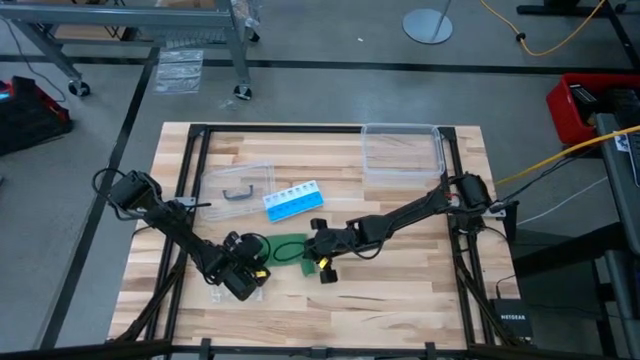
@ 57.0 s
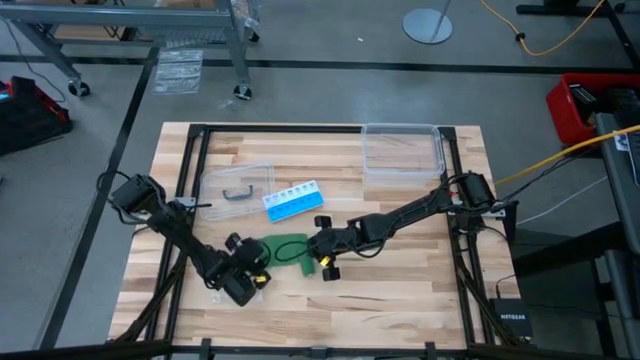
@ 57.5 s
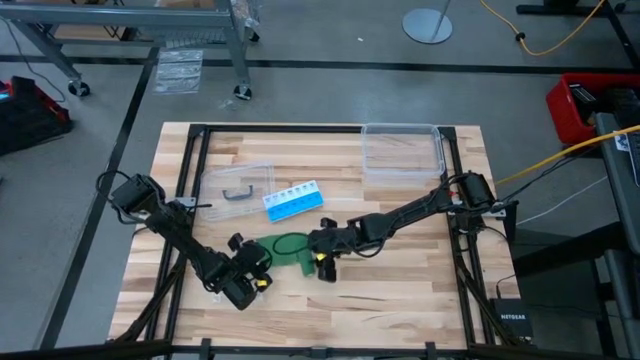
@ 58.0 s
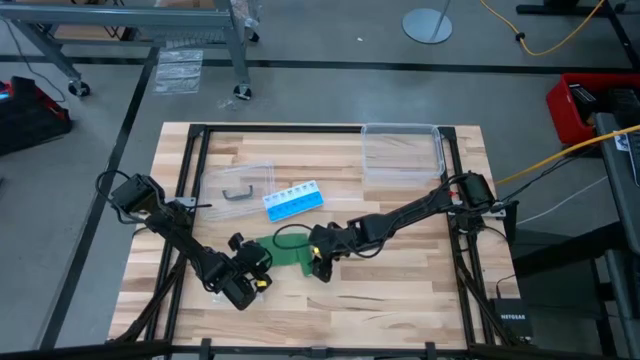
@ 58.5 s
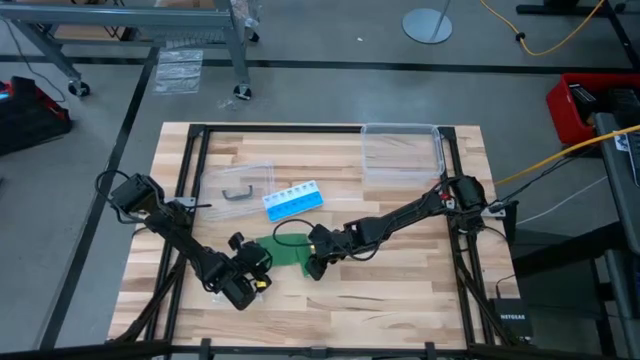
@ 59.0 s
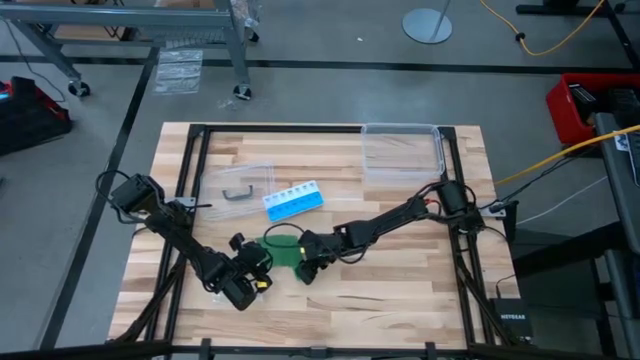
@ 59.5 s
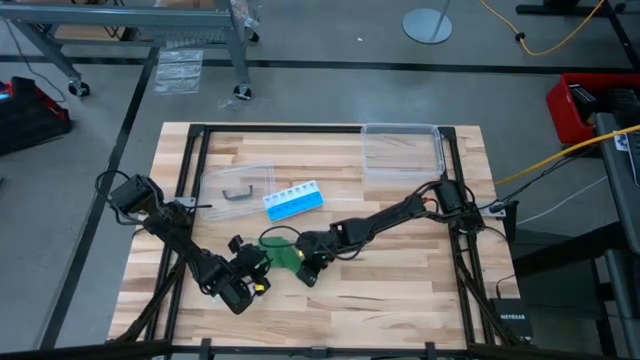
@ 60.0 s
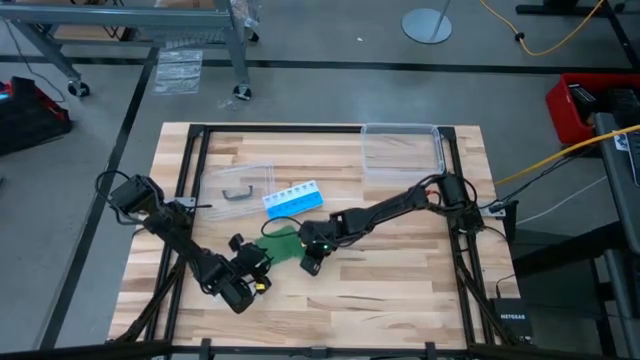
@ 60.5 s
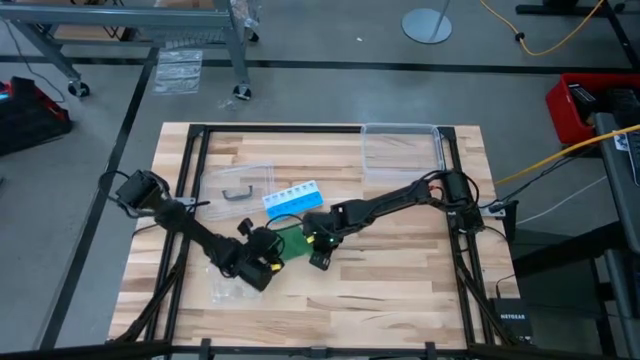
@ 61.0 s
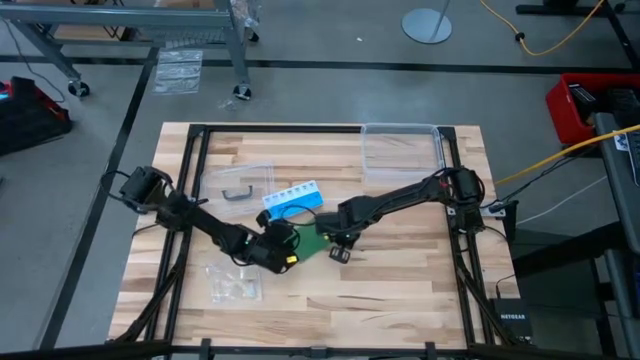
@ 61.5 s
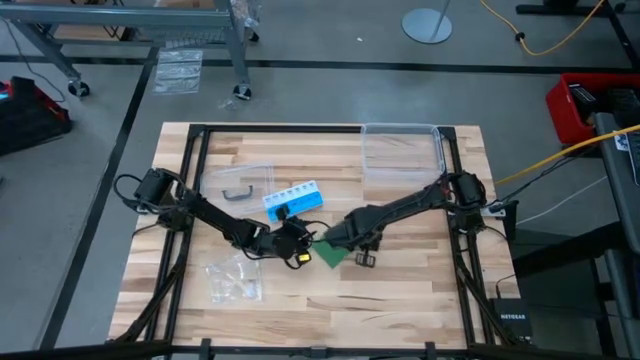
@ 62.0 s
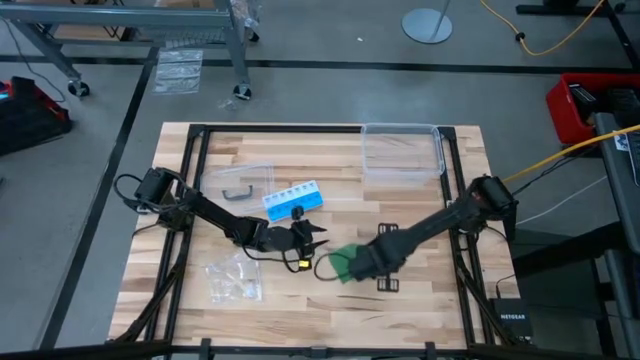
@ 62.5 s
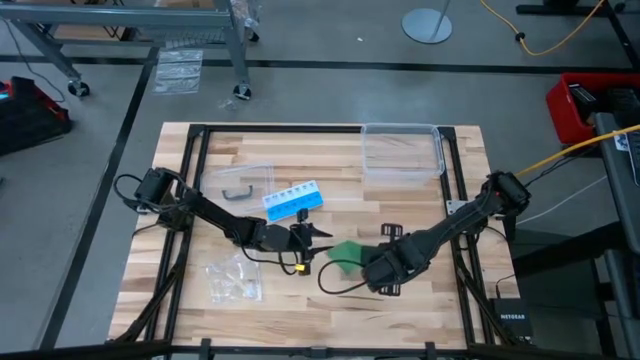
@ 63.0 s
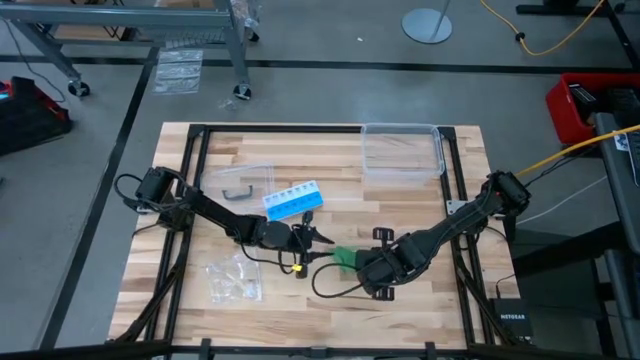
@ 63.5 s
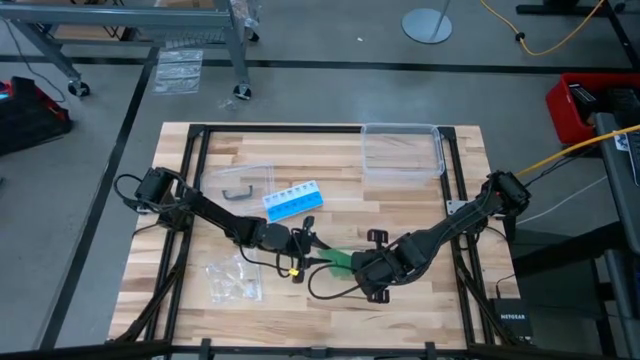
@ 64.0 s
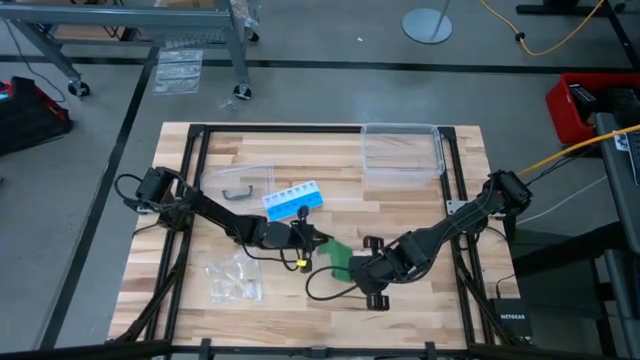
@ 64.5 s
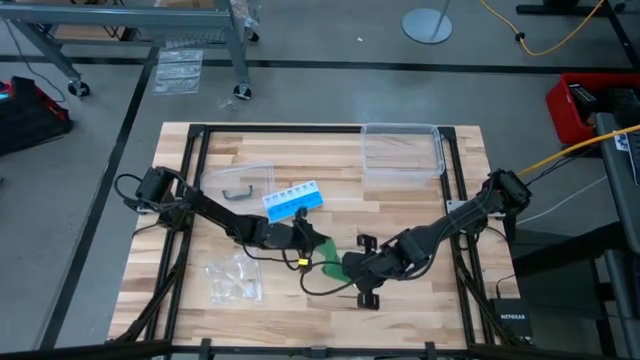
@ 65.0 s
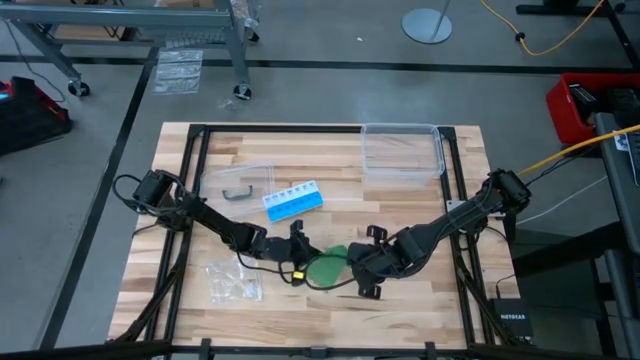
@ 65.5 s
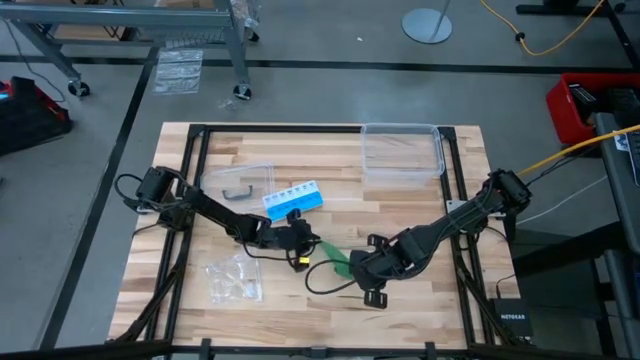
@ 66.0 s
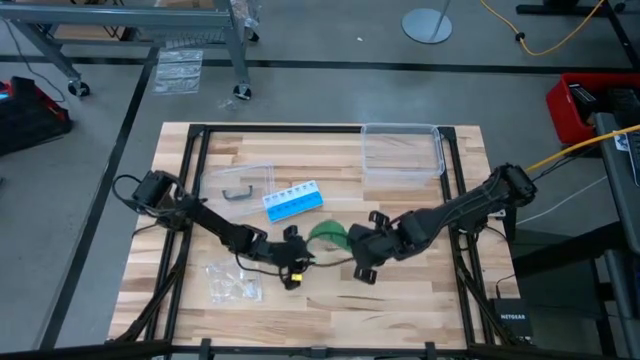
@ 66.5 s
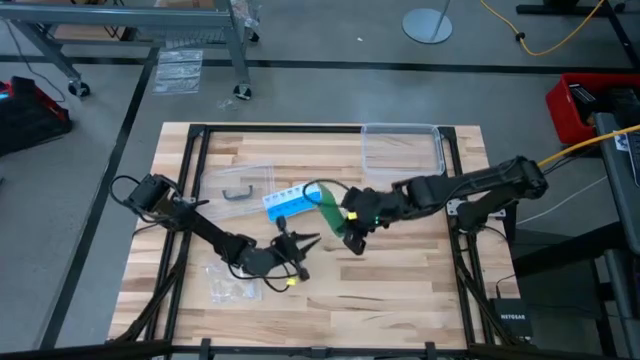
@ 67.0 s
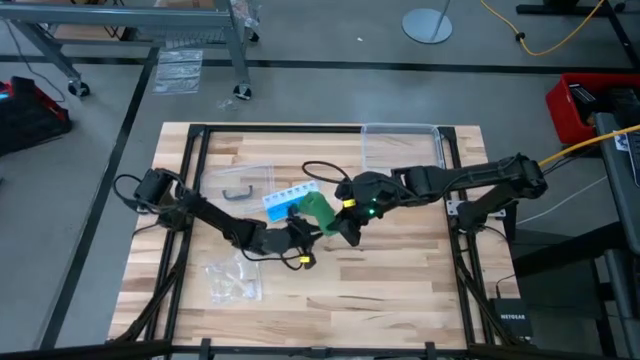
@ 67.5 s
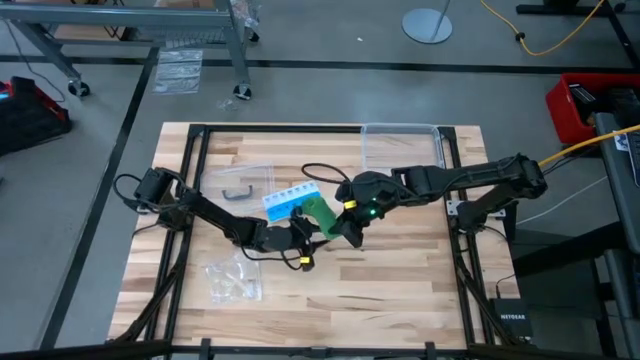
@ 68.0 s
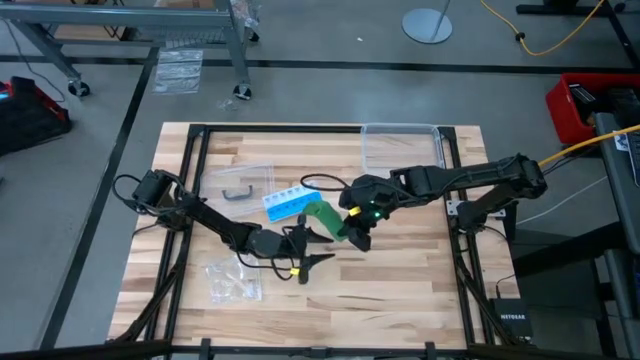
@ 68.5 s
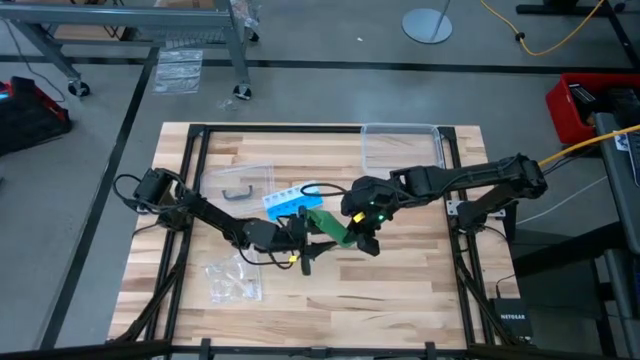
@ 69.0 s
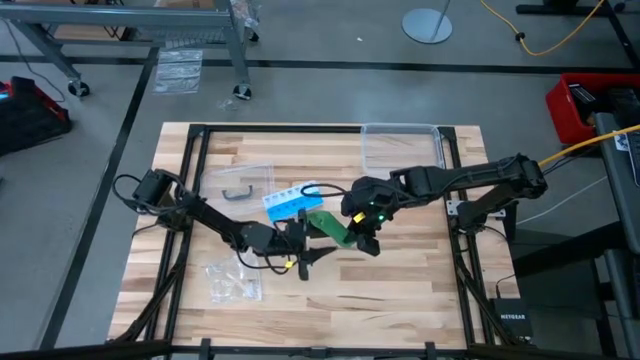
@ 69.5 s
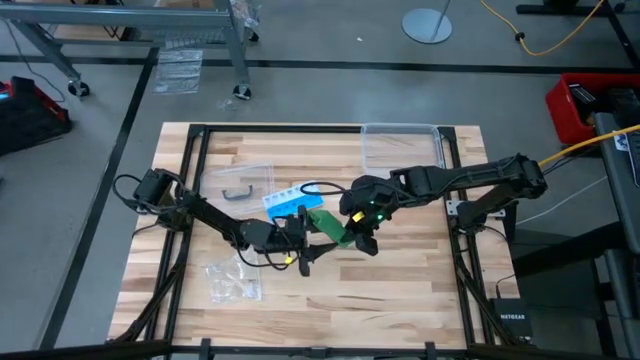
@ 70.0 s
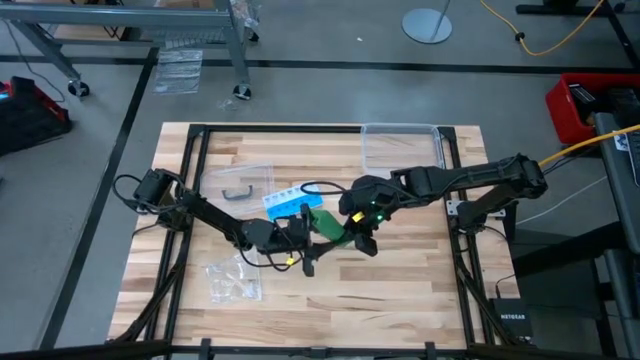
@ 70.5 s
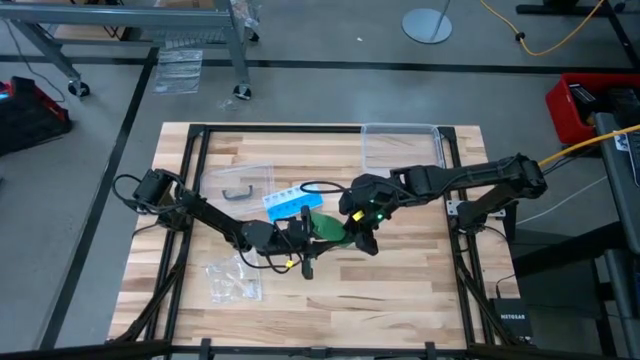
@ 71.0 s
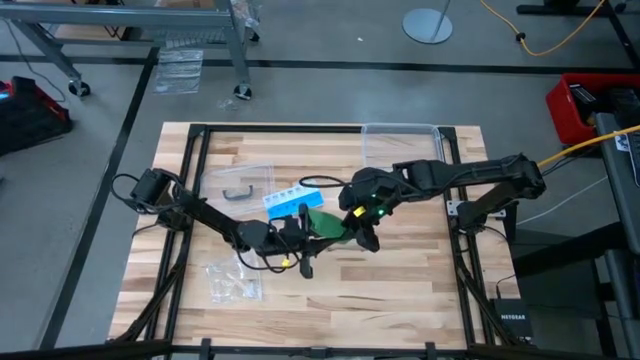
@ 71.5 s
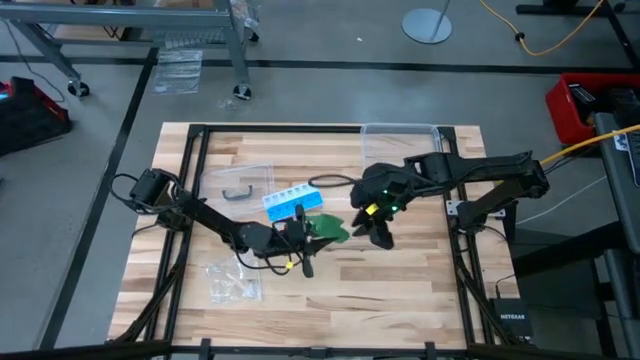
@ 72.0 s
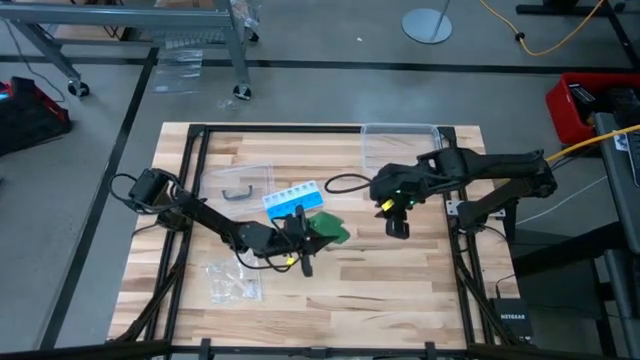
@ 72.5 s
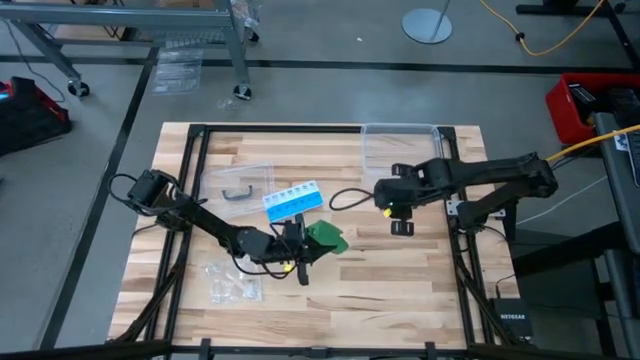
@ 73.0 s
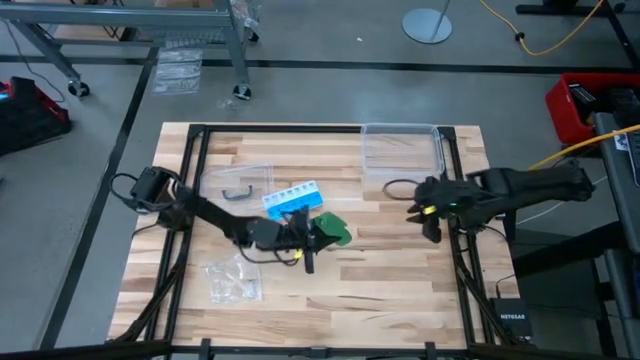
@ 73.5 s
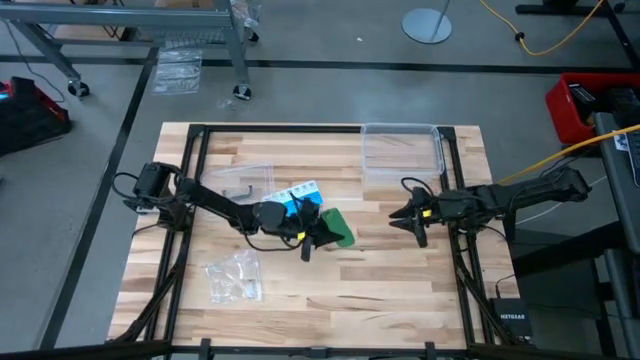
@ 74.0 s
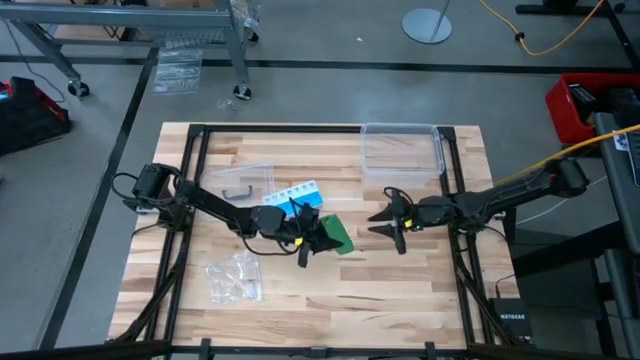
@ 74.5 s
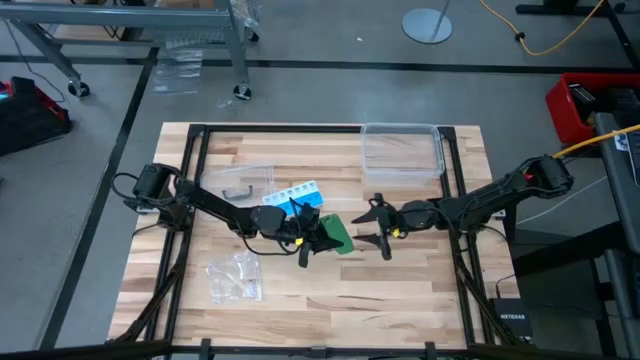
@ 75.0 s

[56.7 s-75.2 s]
Task: Roll bandage
Roll the green bandage

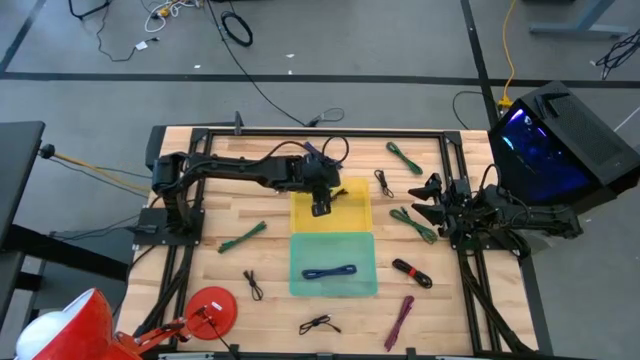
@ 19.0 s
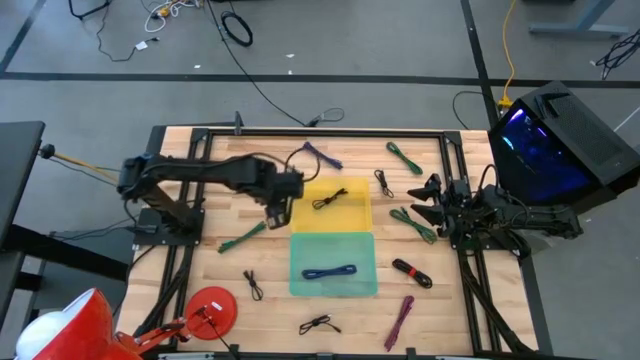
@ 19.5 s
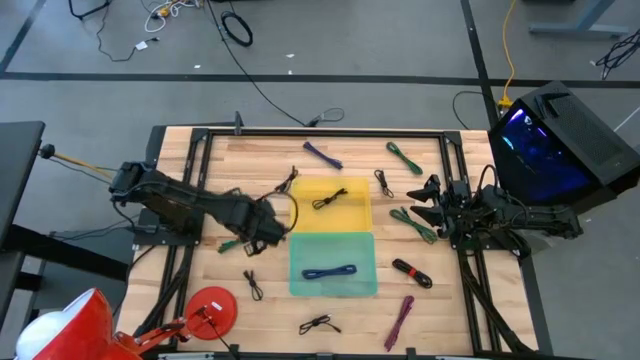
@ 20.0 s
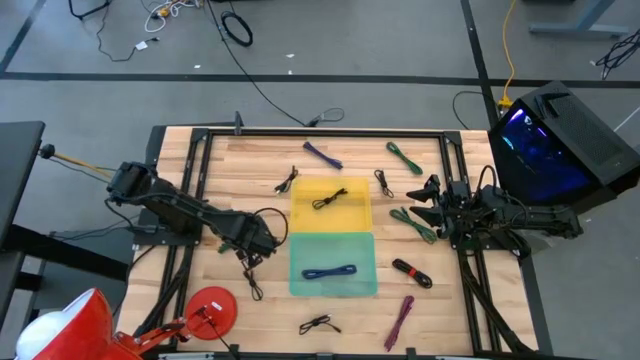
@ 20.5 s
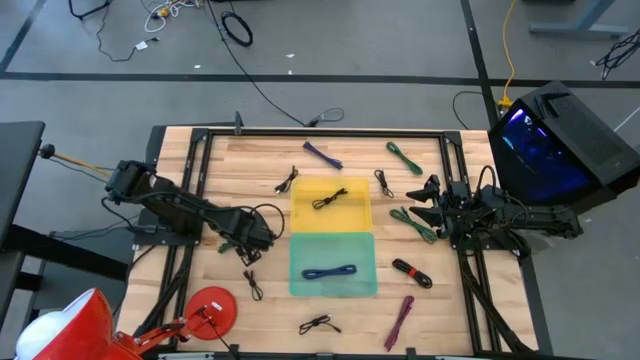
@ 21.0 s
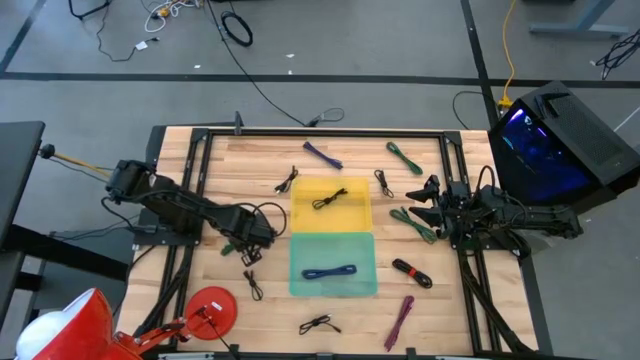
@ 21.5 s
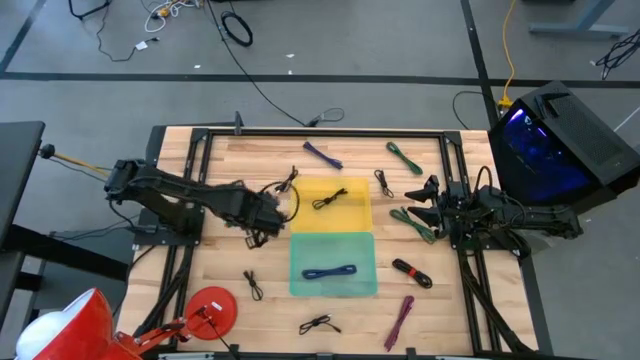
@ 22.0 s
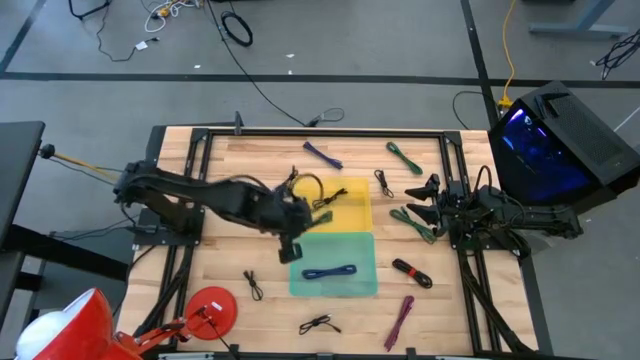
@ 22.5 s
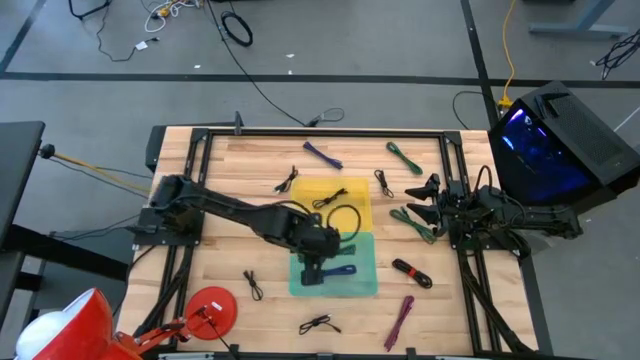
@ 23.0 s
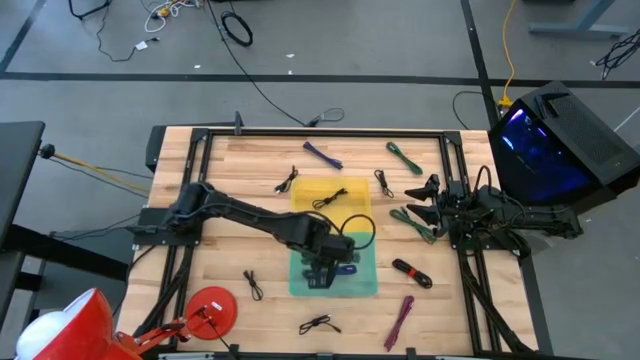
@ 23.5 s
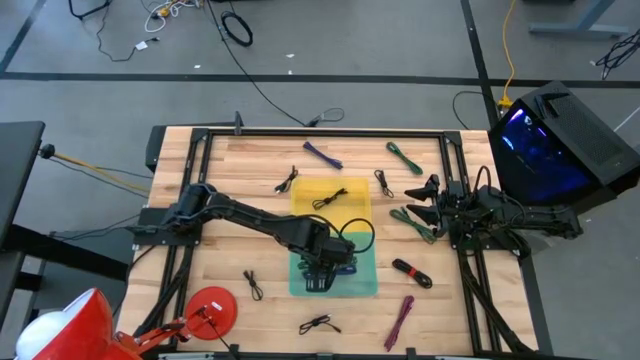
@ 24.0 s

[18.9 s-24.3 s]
Task: Pick & Place USB Port
Put the striped green charger cable into the blue bin
